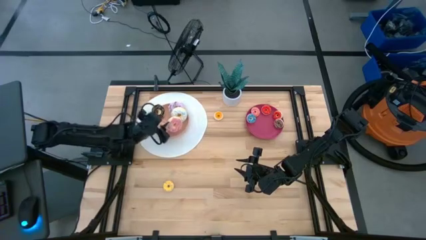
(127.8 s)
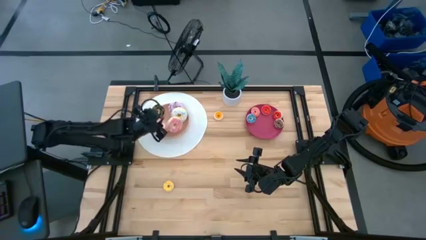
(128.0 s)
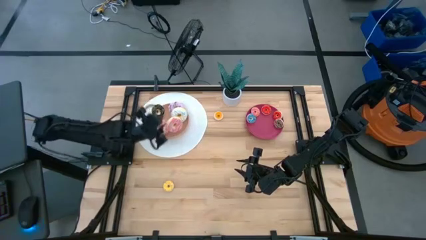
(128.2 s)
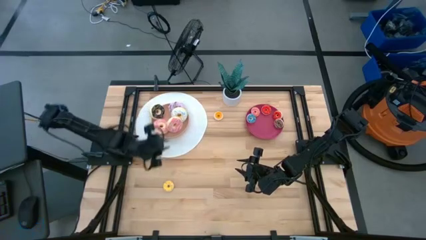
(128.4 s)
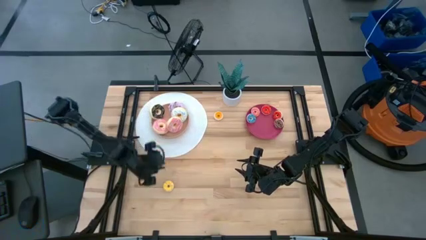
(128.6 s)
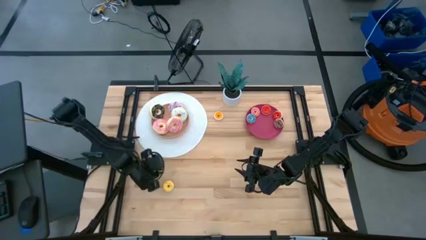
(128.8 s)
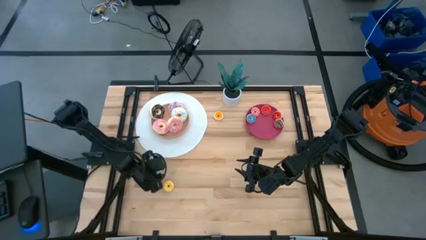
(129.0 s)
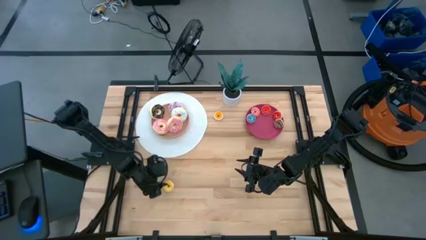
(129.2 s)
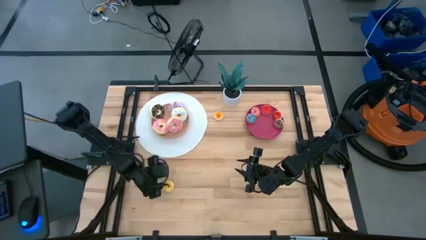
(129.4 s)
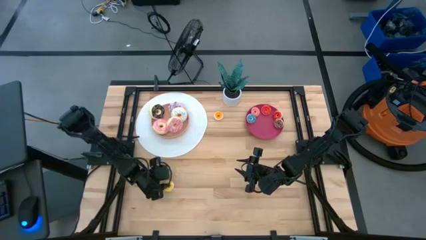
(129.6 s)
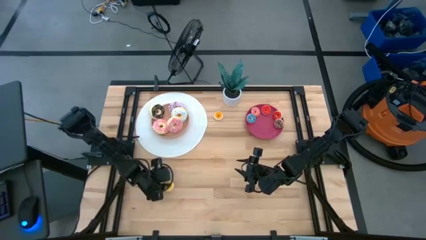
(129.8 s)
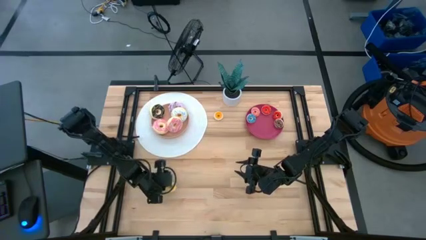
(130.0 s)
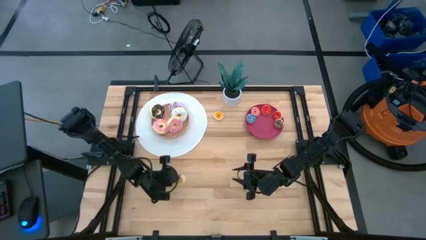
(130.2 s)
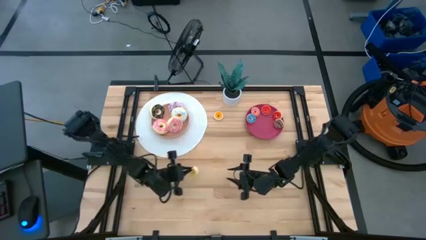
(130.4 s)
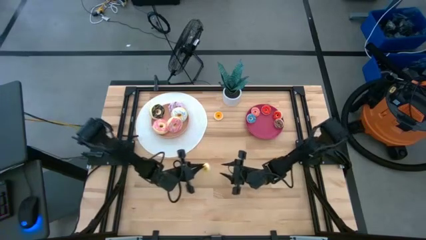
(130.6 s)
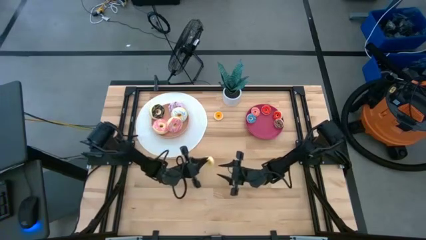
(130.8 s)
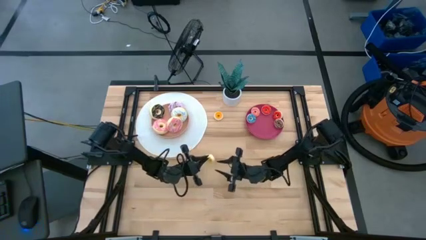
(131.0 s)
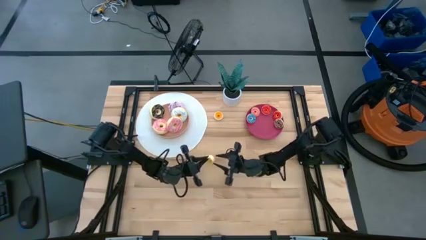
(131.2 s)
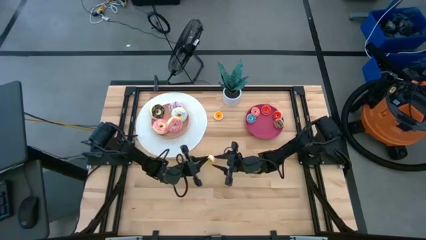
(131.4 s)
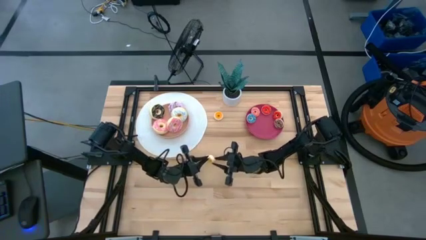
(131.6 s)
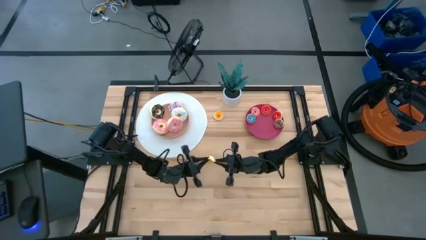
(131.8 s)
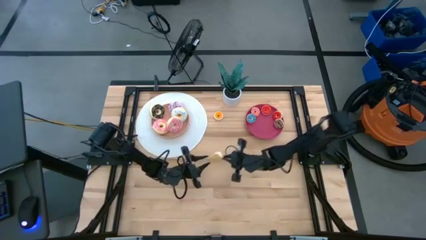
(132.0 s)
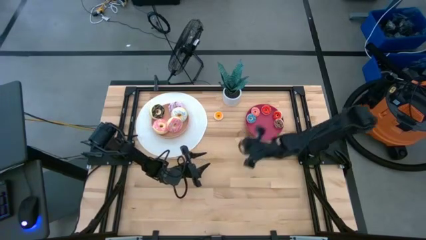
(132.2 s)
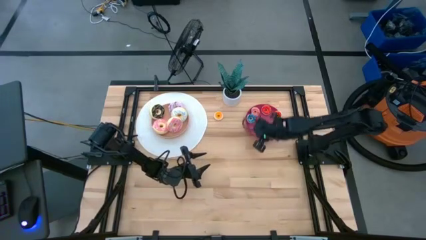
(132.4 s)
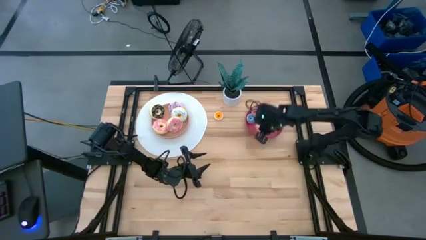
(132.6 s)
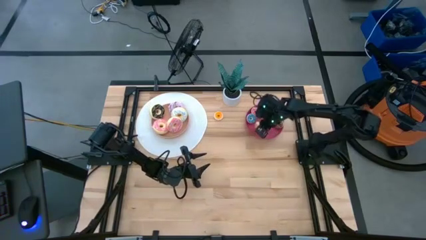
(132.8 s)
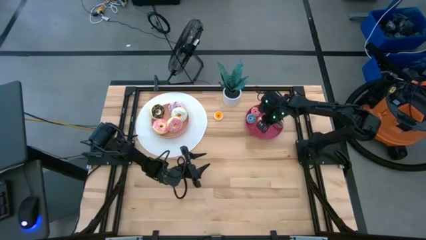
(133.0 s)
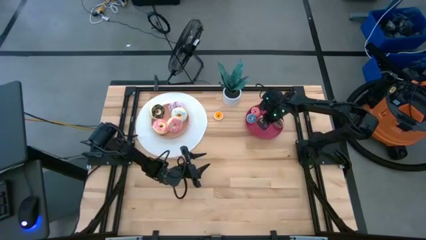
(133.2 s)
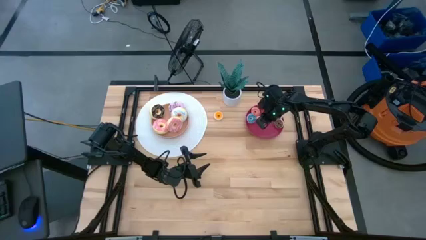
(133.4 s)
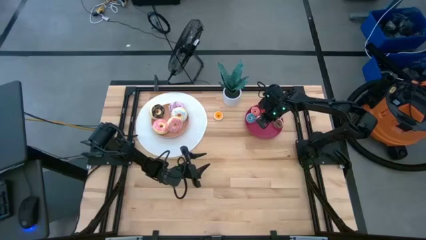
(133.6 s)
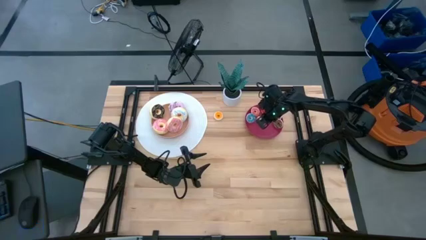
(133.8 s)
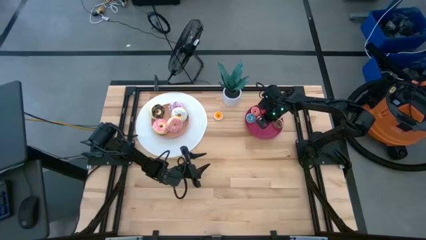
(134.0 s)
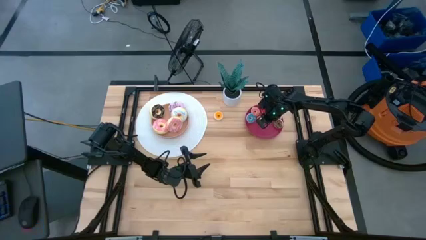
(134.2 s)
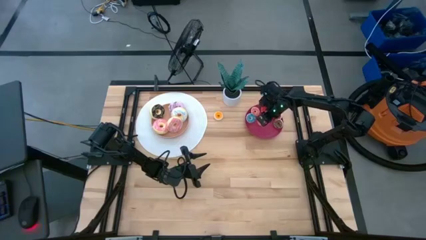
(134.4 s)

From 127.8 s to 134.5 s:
Task: Pick & Place donuts
Put the small yellow donut on the red plate

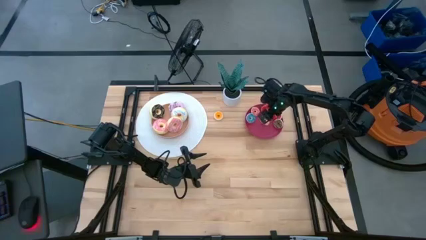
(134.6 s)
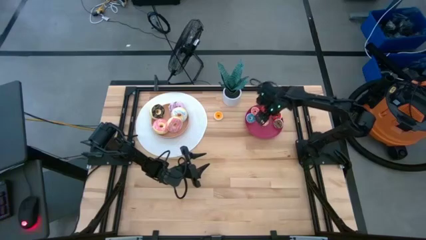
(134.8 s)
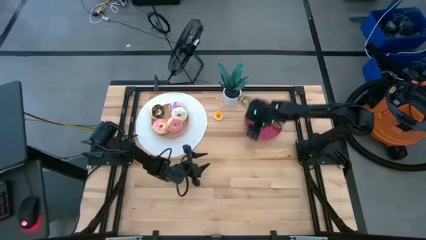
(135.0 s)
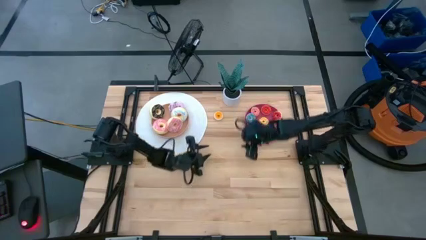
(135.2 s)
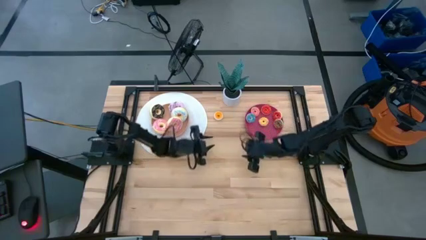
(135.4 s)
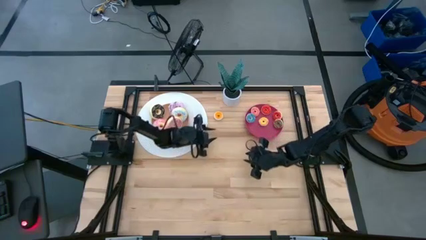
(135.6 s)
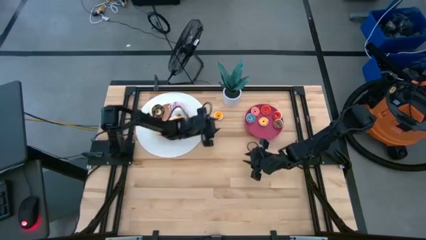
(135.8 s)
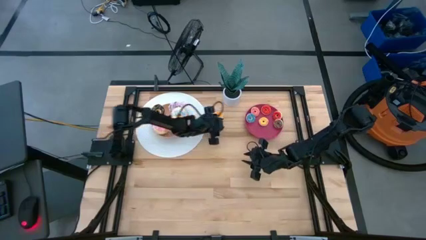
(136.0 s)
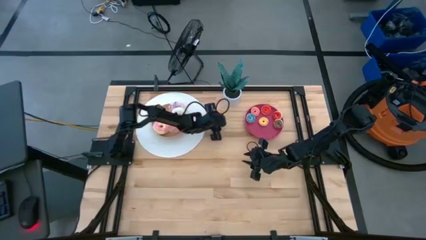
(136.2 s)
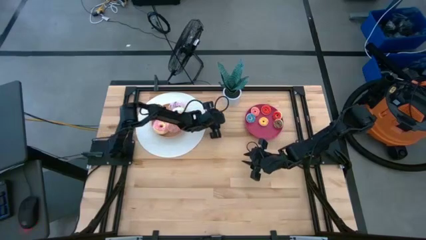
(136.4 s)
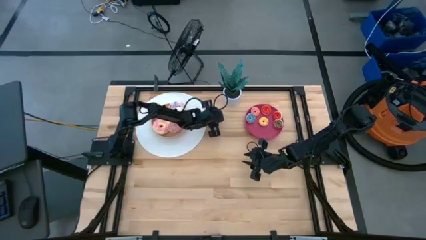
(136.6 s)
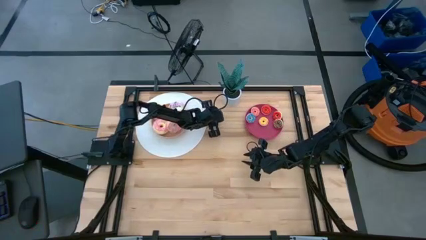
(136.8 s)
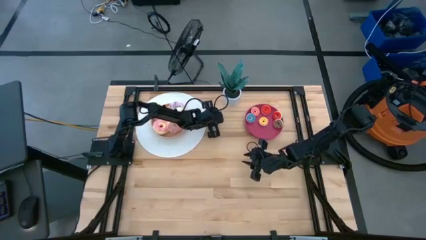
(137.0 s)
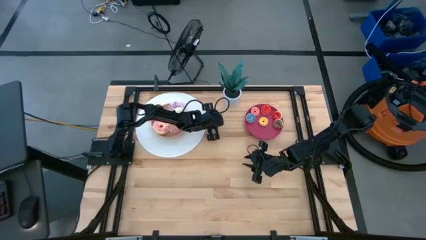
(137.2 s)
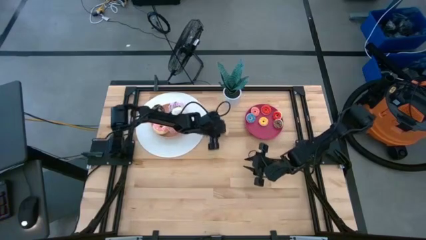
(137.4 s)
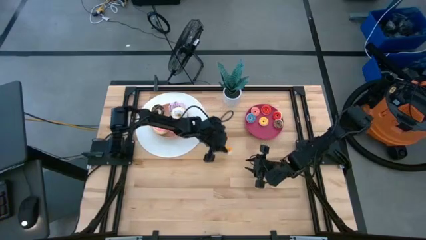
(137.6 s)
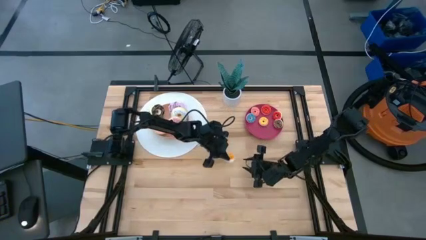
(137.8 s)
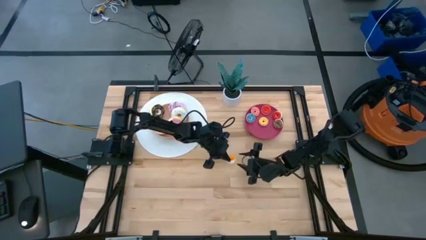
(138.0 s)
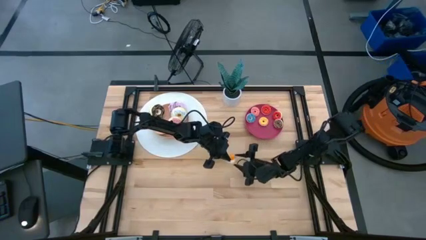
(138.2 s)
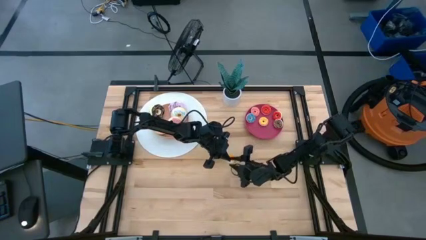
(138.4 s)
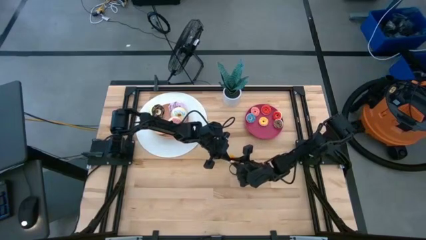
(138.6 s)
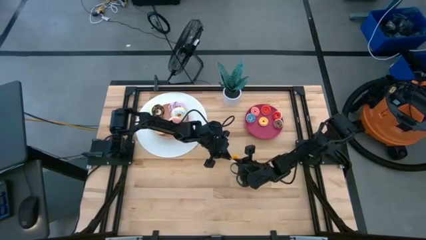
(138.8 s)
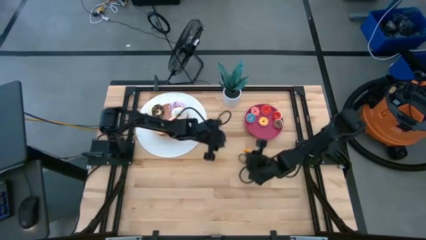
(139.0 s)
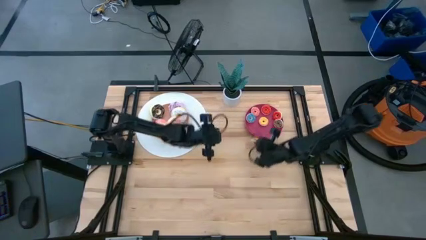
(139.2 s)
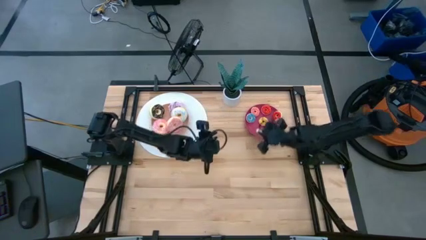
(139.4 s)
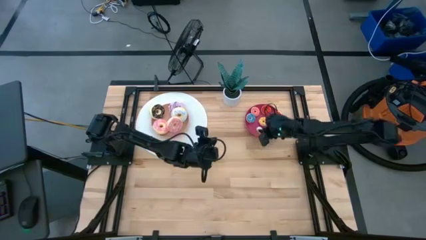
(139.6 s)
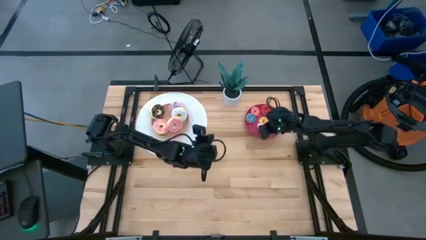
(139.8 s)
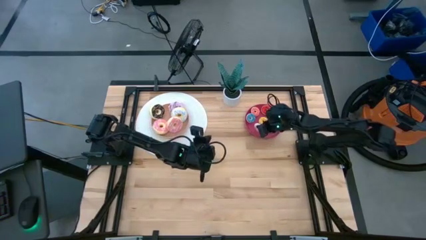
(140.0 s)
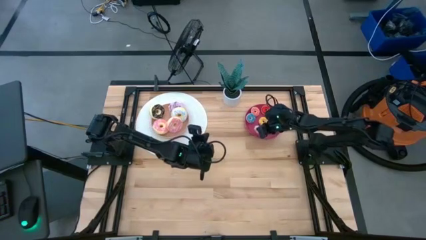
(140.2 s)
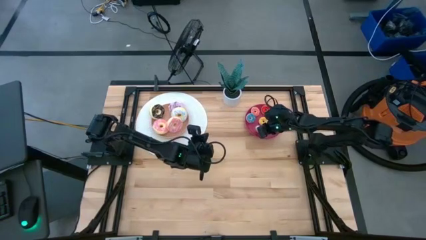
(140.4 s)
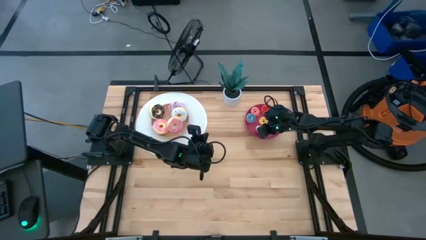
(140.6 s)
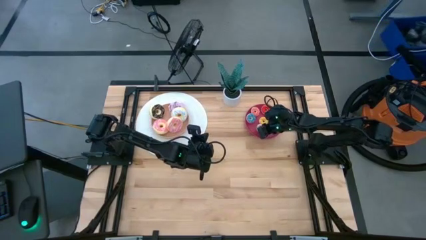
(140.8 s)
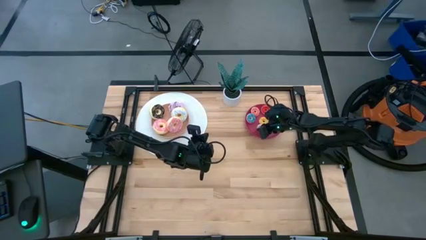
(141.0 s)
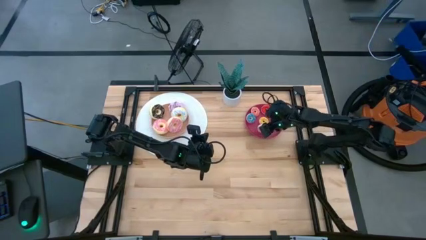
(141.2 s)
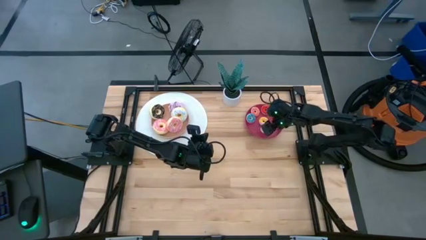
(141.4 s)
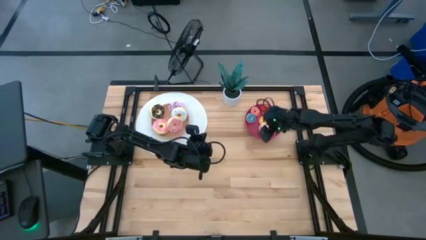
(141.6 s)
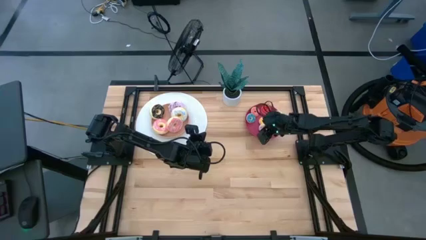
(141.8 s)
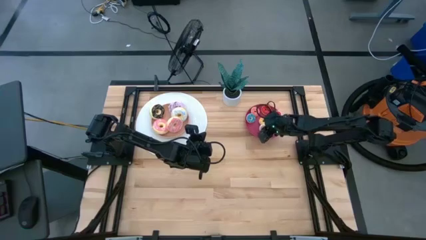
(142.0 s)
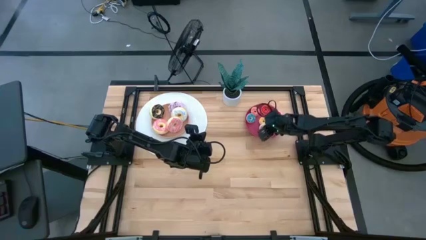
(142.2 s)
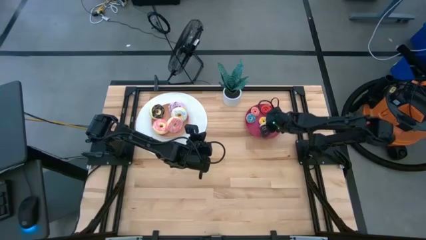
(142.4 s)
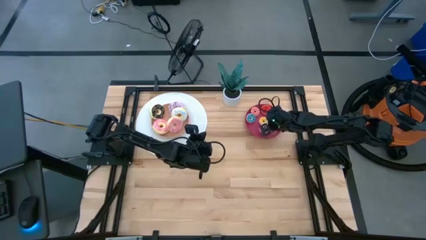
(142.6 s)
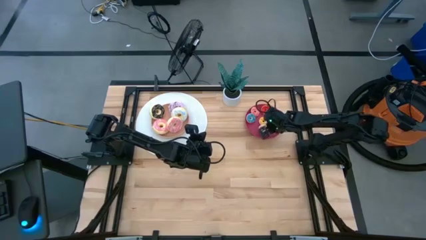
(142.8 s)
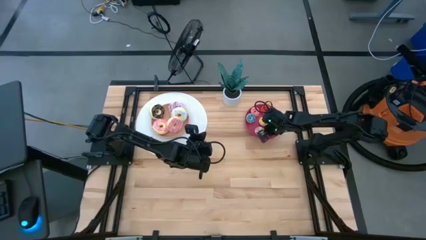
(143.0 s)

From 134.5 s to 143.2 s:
Put the small white donut on the red plate
